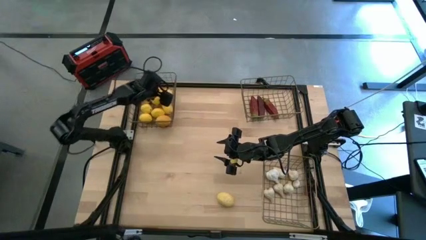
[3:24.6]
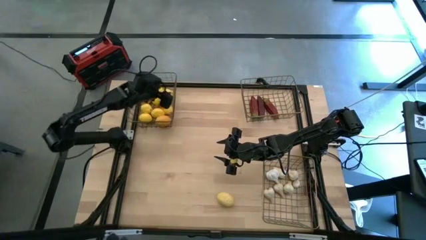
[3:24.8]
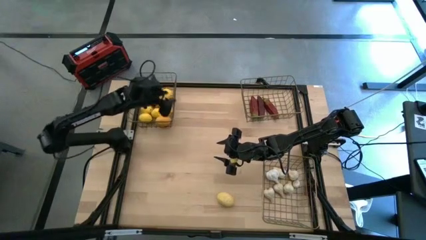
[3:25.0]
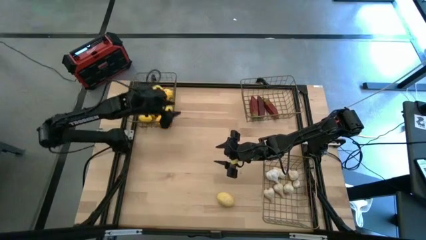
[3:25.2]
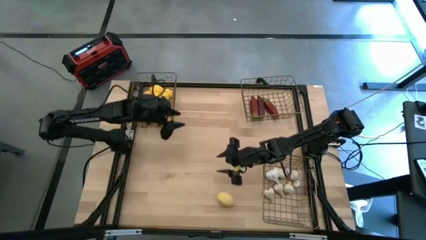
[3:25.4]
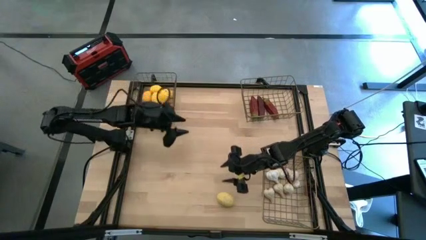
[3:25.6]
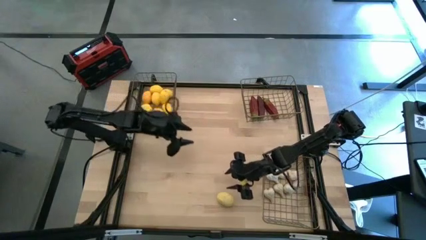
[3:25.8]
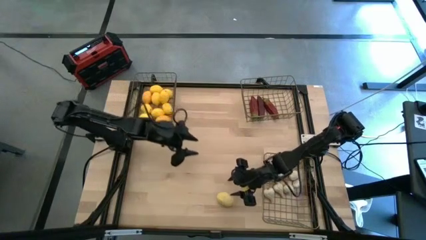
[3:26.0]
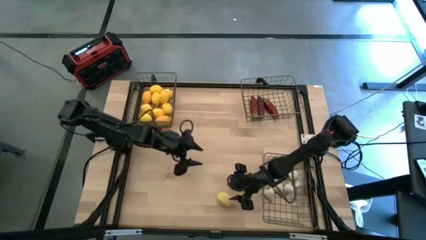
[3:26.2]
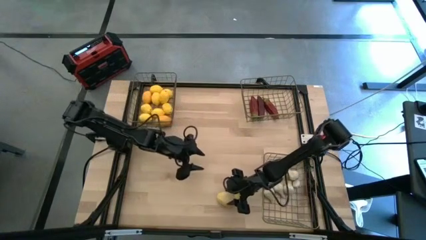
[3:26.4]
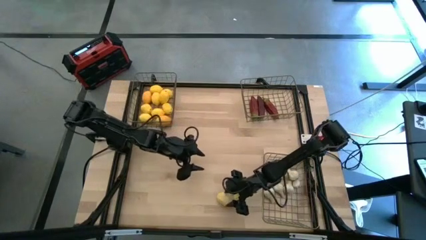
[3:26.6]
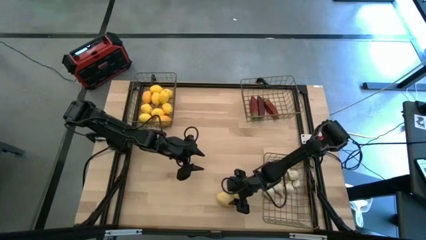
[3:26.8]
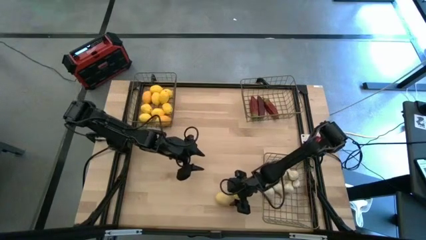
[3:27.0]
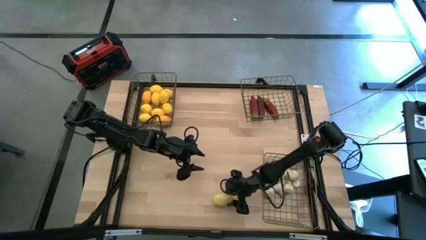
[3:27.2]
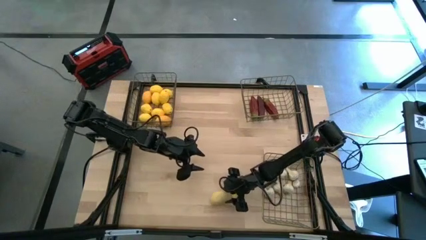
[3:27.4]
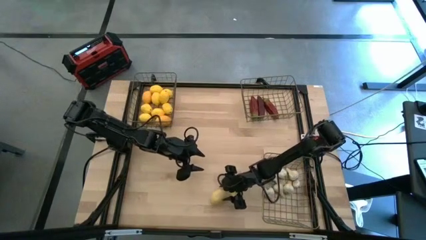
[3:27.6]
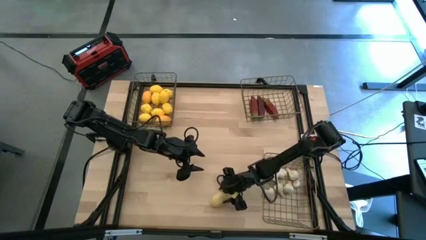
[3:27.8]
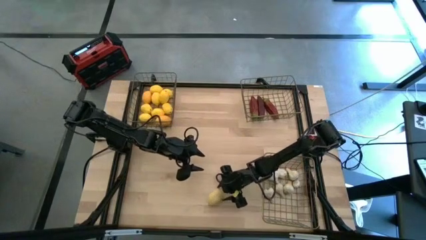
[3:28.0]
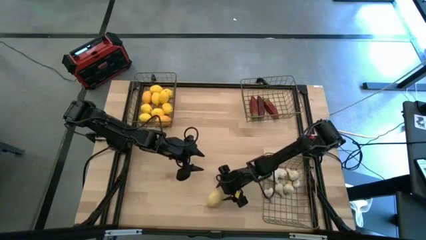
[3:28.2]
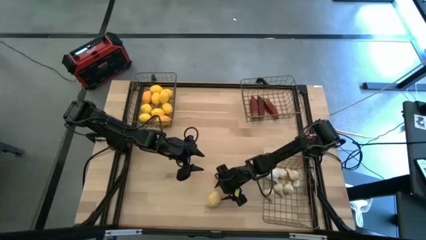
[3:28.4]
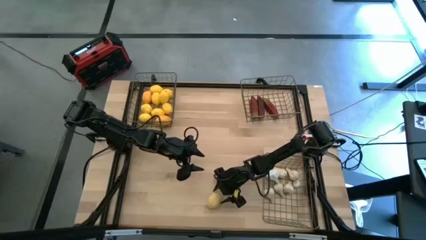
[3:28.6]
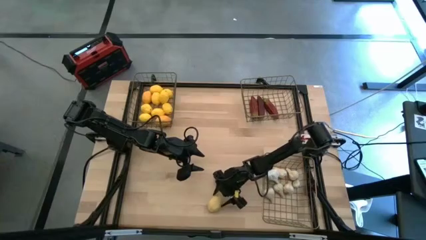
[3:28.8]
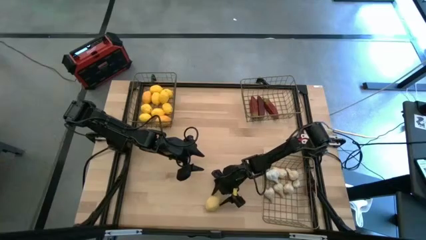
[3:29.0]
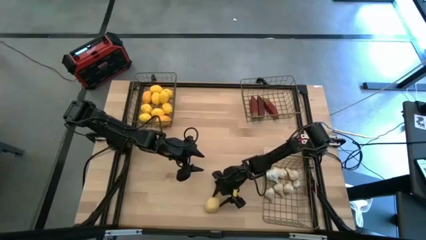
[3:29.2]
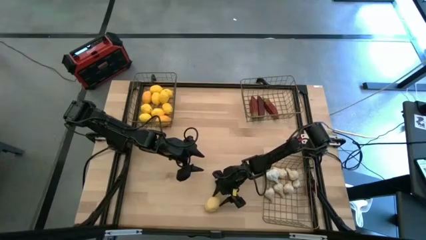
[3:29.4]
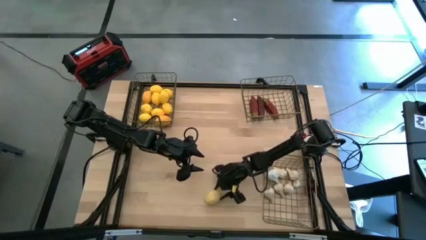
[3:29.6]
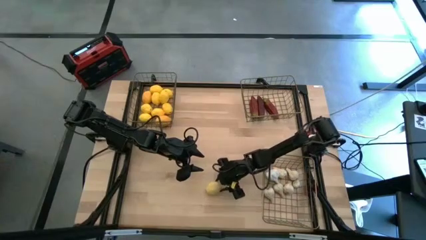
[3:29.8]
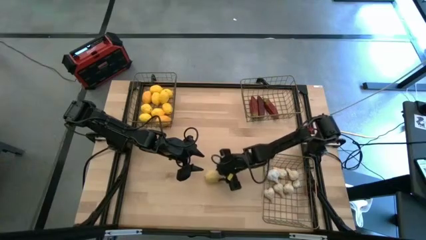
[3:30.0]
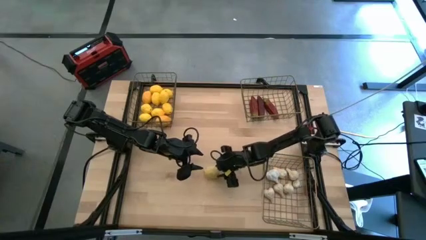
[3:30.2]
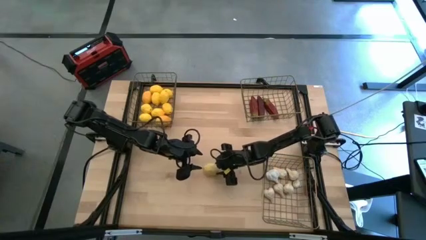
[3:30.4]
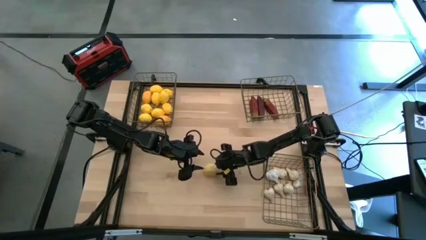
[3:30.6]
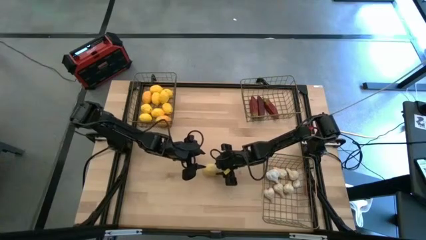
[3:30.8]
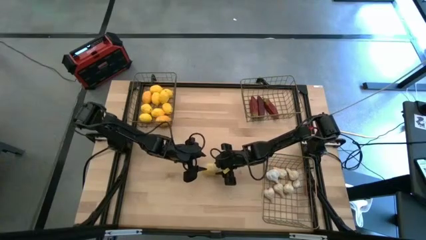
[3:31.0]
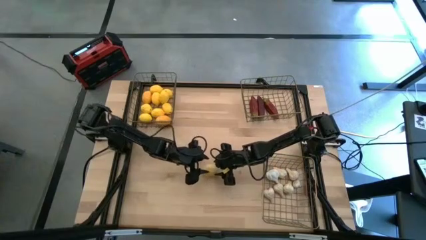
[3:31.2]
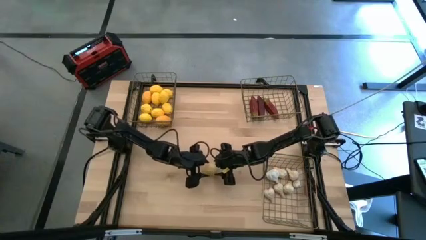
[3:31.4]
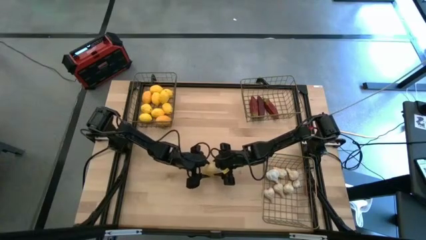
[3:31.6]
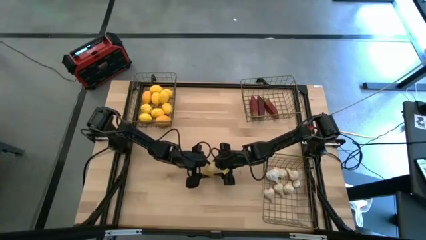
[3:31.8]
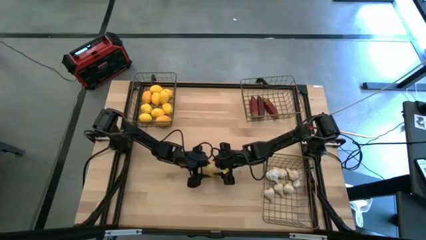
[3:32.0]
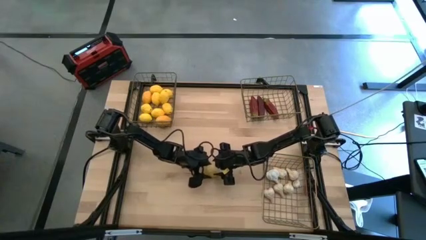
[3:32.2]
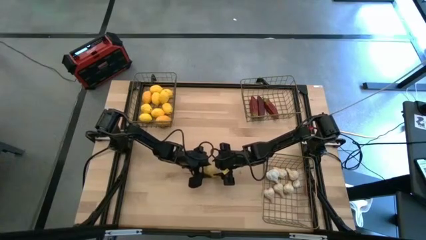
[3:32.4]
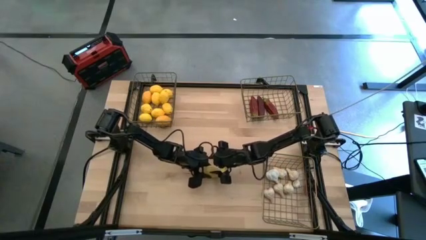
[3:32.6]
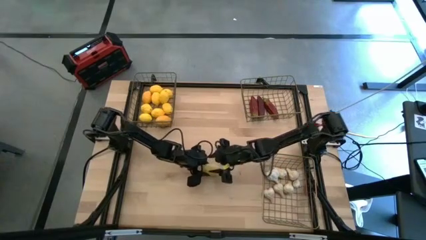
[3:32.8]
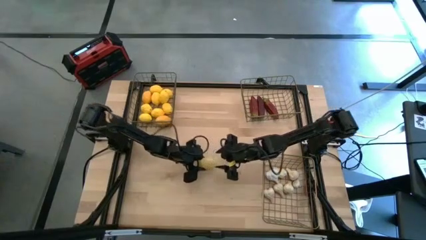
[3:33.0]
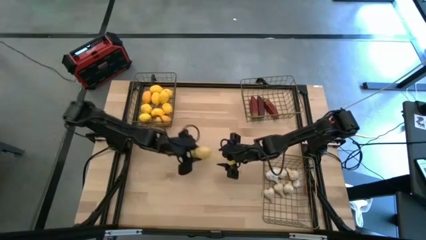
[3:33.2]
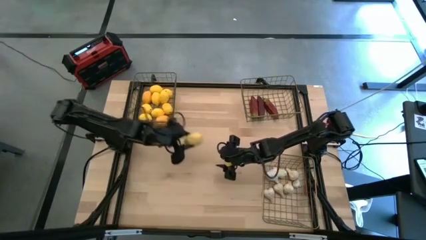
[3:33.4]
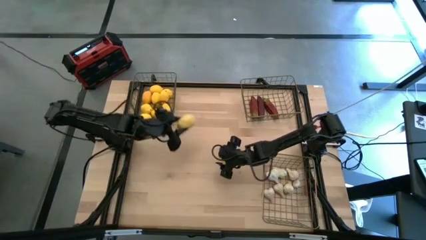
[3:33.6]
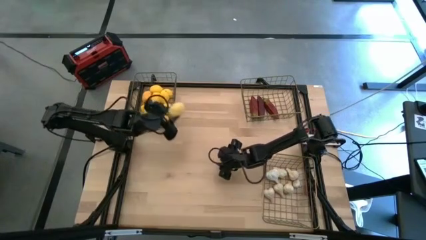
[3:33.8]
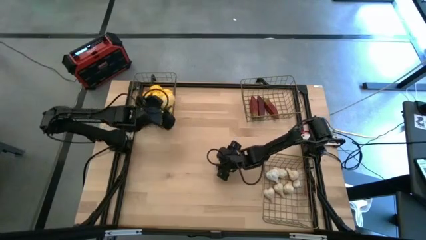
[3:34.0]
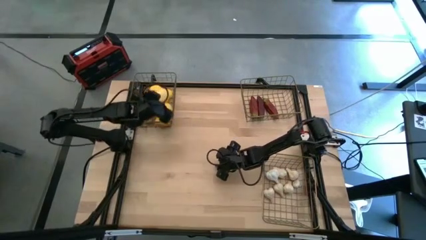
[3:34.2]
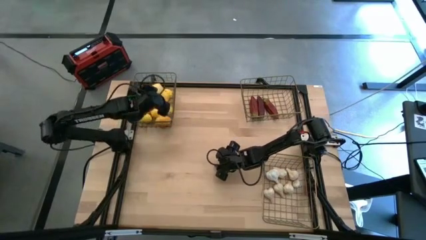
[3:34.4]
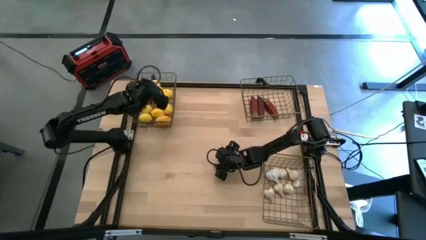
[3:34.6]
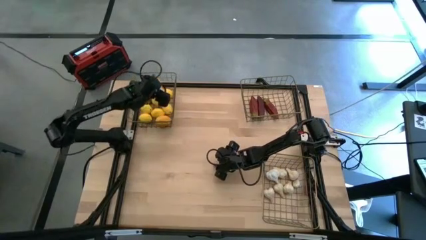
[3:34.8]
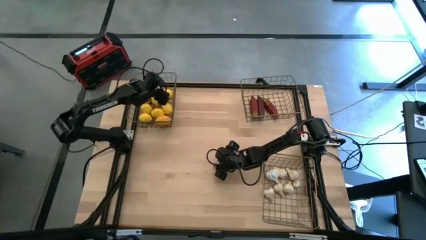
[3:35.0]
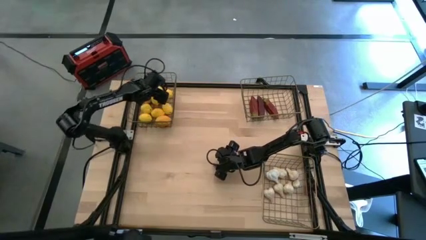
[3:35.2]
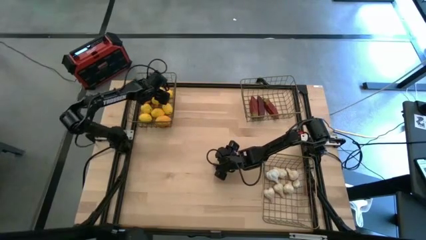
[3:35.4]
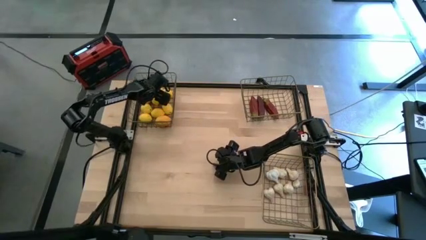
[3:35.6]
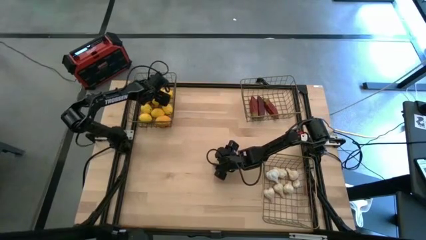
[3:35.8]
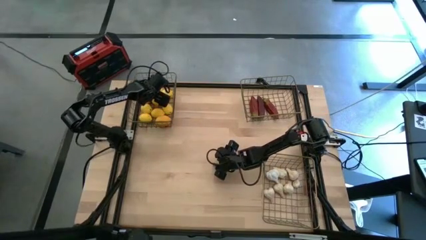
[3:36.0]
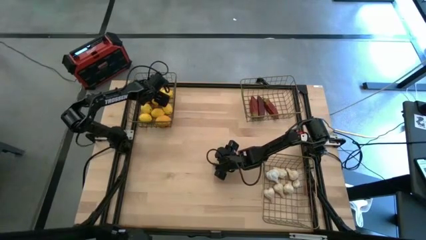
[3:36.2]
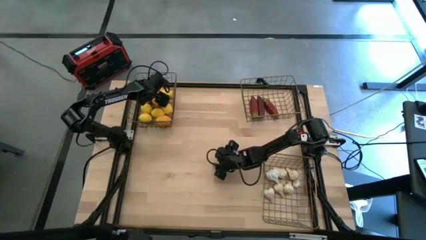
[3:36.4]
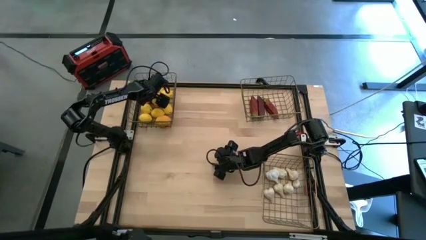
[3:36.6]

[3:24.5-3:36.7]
Task: Sort produce into baskets
Put the yellow lemon into the top left wire basket
